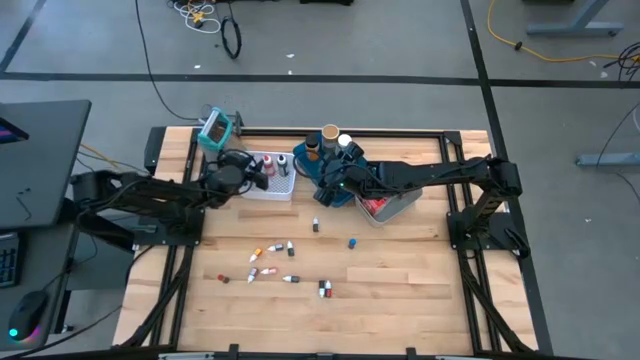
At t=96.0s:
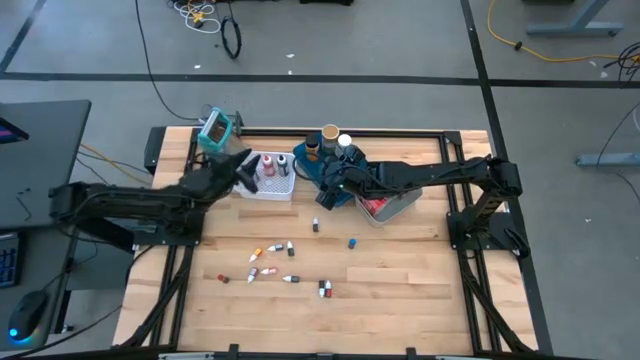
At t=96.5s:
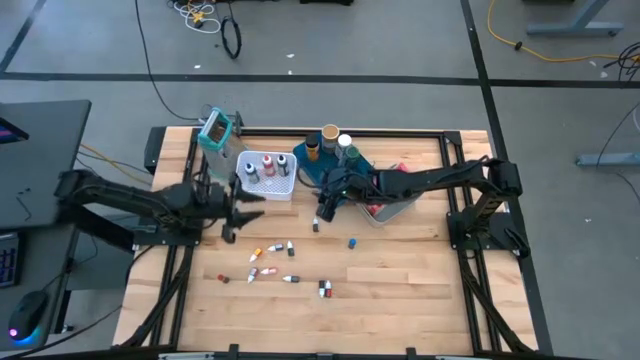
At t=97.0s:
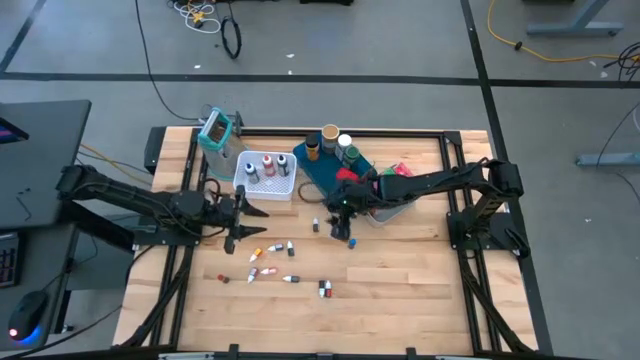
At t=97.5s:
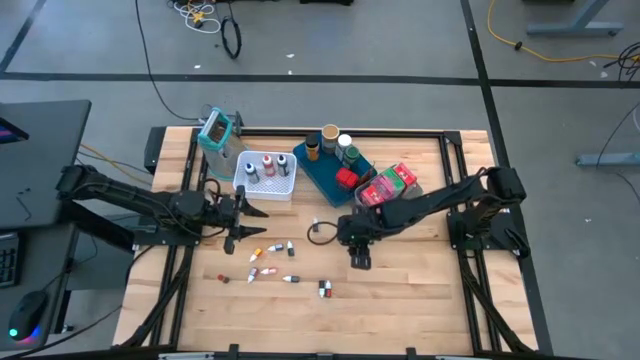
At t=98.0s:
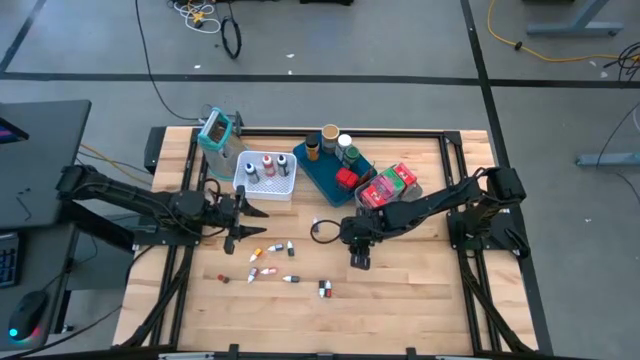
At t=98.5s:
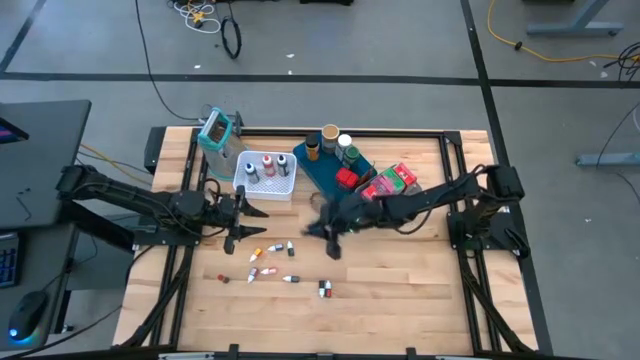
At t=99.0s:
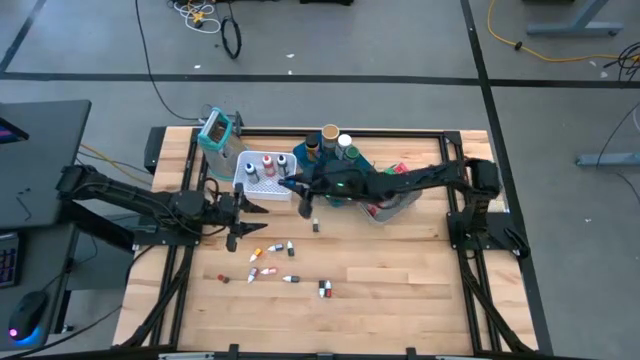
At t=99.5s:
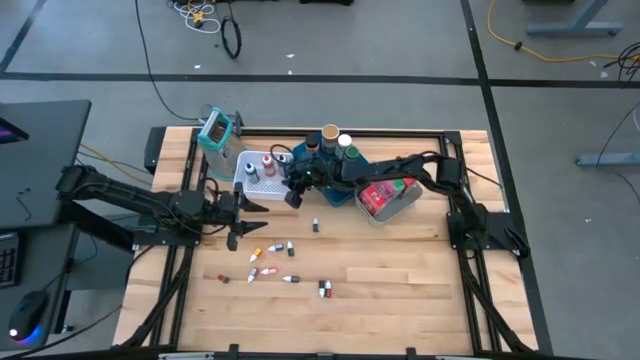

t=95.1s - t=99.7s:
Task: Pick & Place Kitchen Items
Put the blue lid food coloring bottle into the white bin

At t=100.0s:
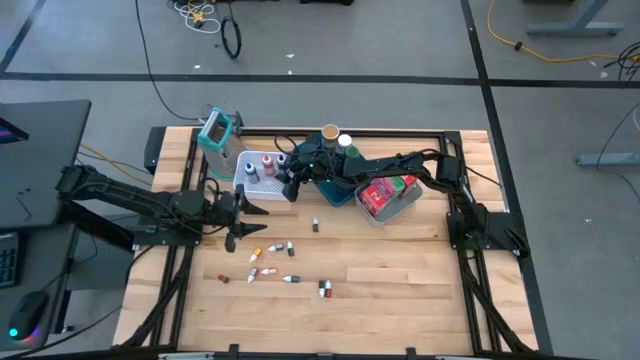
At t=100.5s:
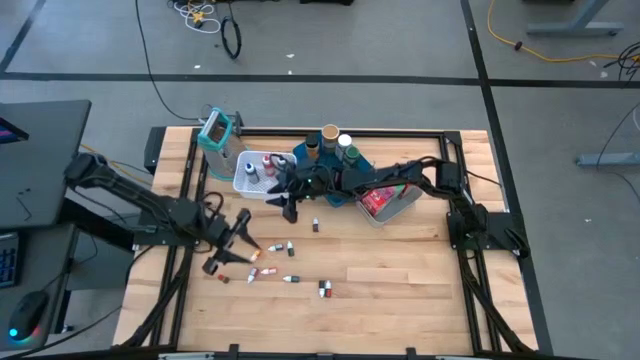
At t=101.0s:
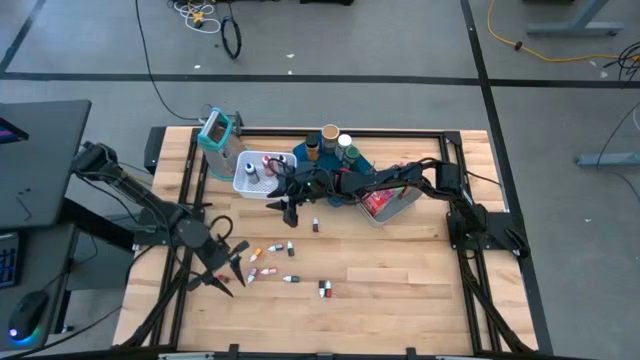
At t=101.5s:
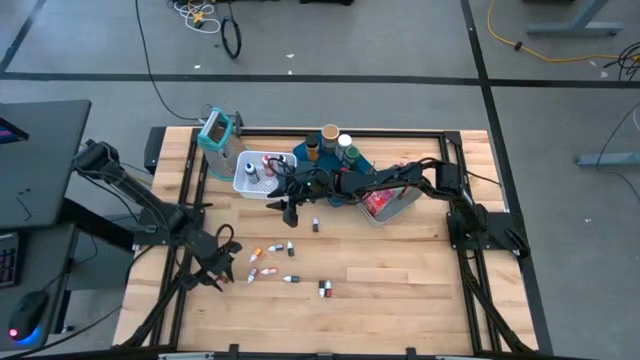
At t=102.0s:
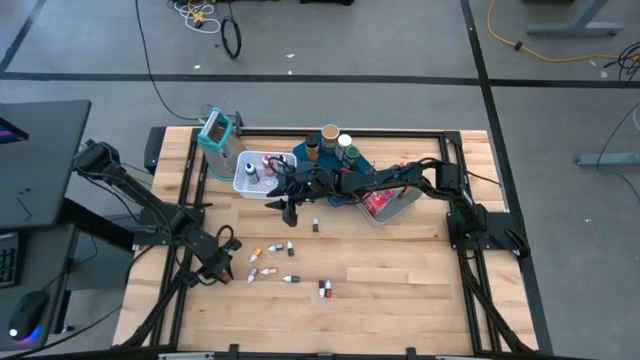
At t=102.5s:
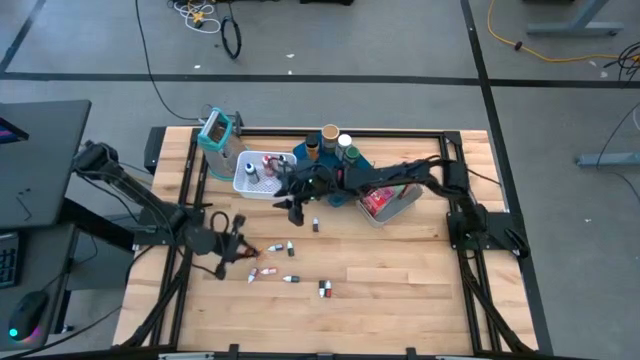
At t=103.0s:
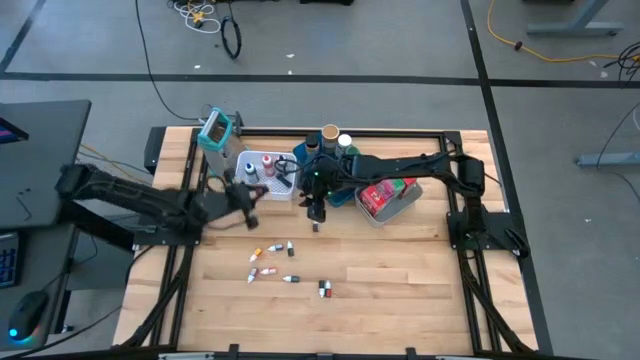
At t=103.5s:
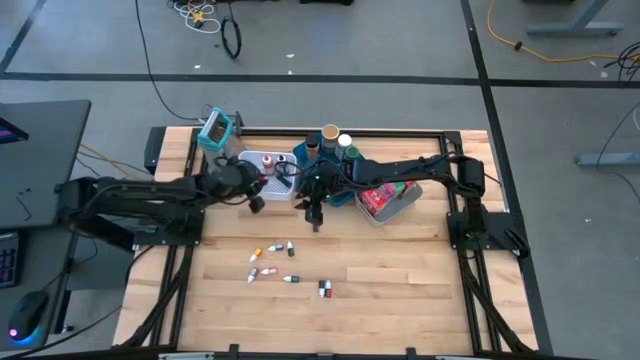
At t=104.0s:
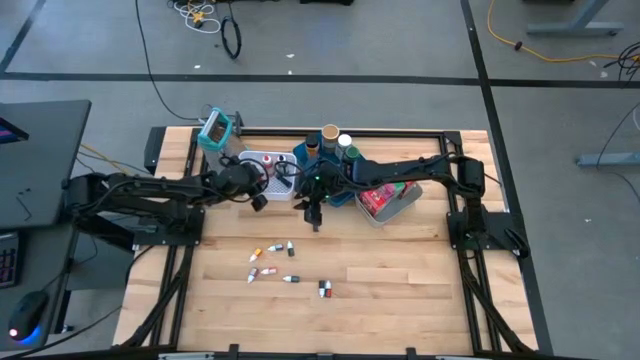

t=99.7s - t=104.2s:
Put the red lid food coloring bottle into the white bin

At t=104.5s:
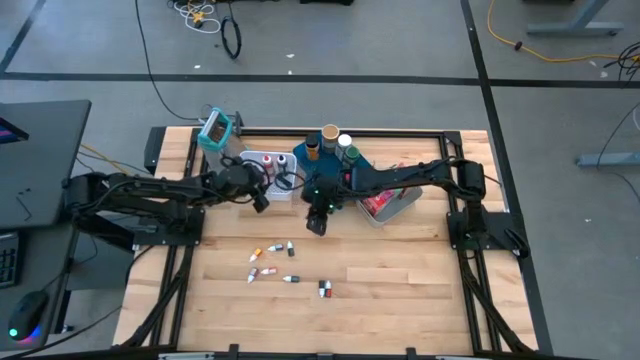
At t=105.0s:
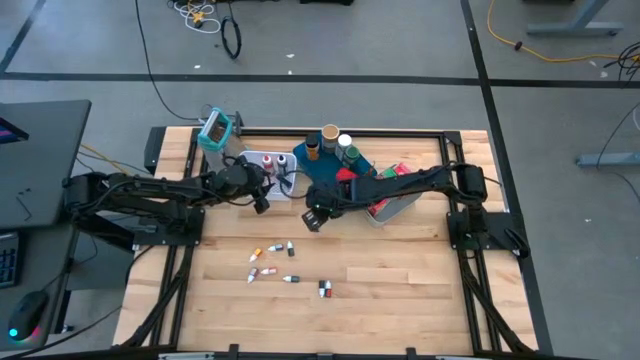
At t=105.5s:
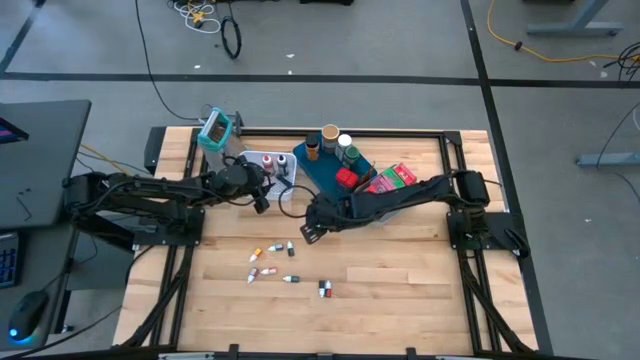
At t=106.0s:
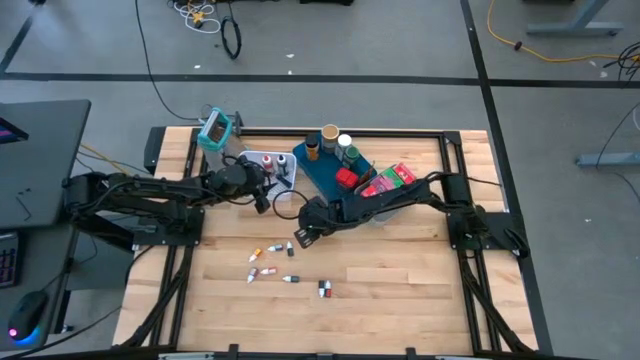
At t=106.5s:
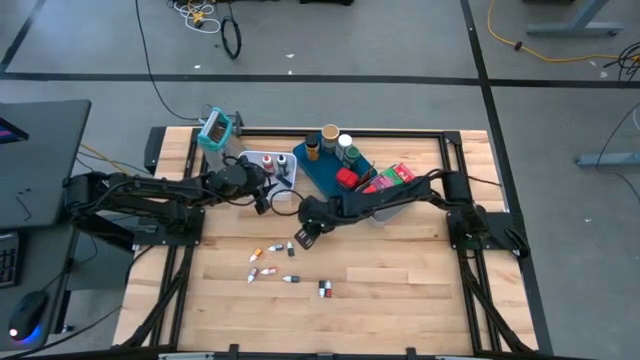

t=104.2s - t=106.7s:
Put the brown food coloring bottle into the white bin

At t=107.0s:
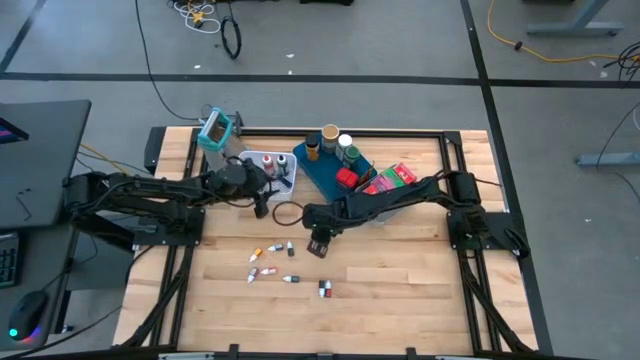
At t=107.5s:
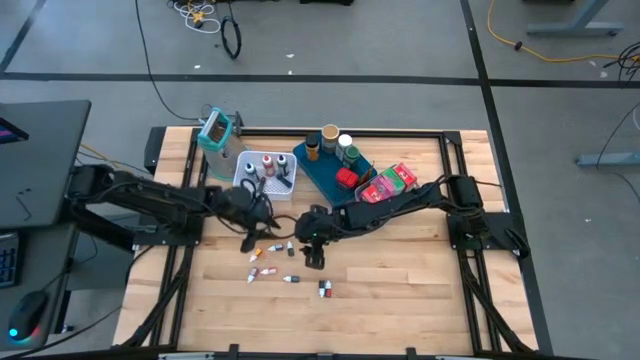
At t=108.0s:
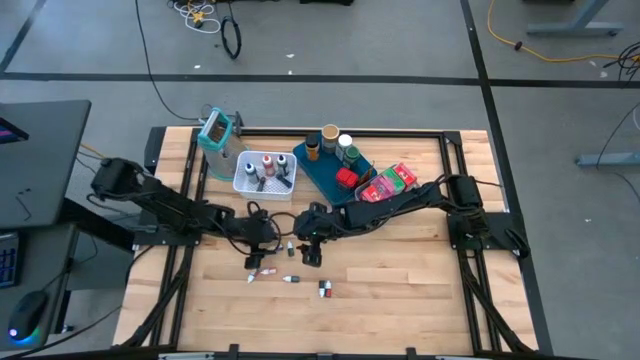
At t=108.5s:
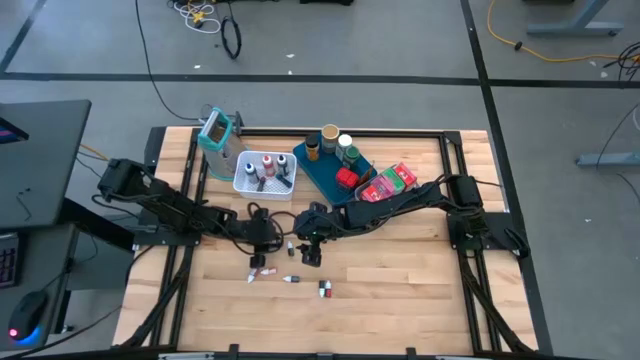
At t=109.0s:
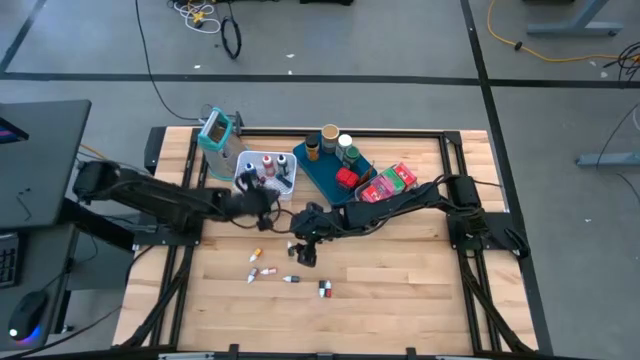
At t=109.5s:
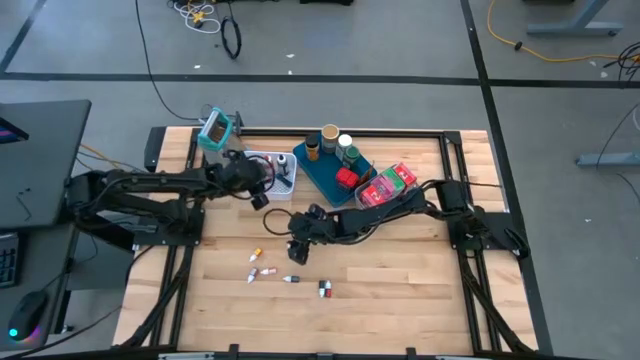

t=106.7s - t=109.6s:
Put the purple food coloring bottle into the white bin

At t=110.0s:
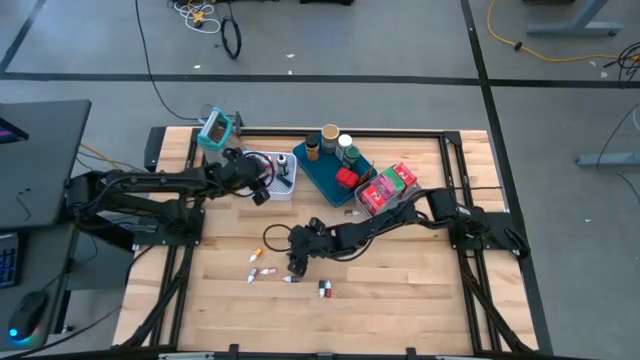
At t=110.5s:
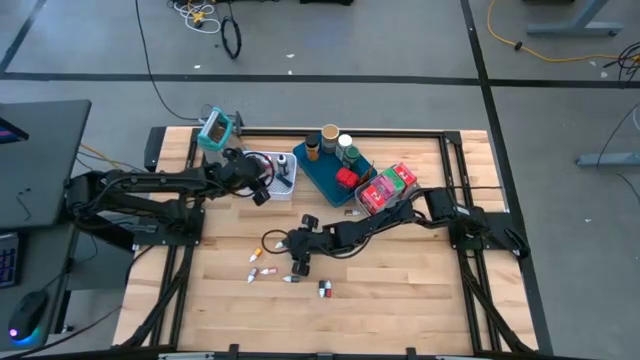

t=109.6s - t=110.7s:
Put the dark green food coloring bottle into the white bin

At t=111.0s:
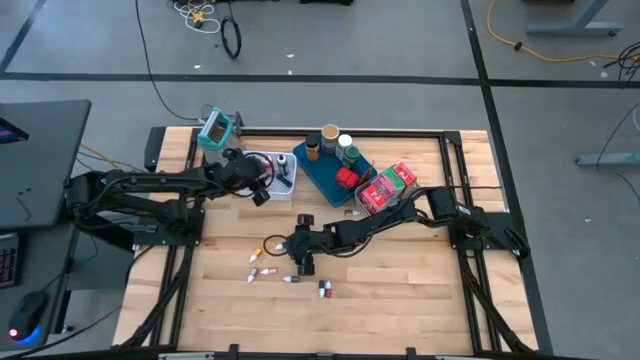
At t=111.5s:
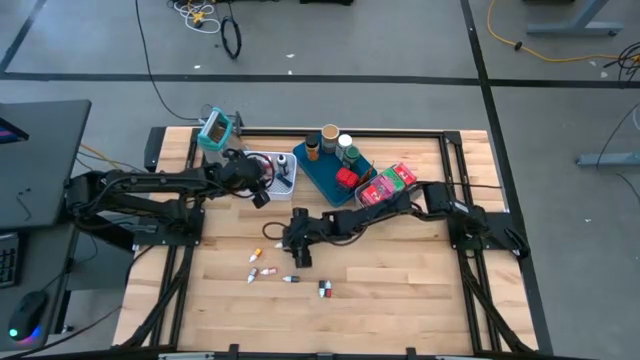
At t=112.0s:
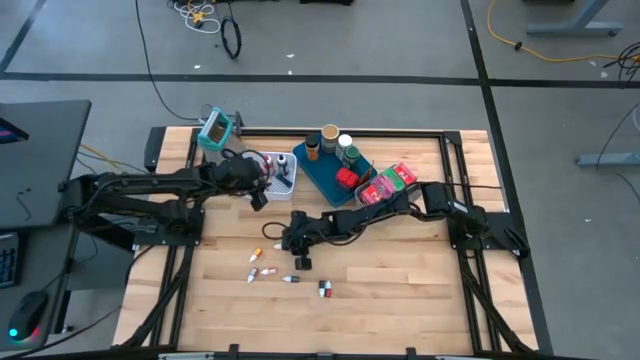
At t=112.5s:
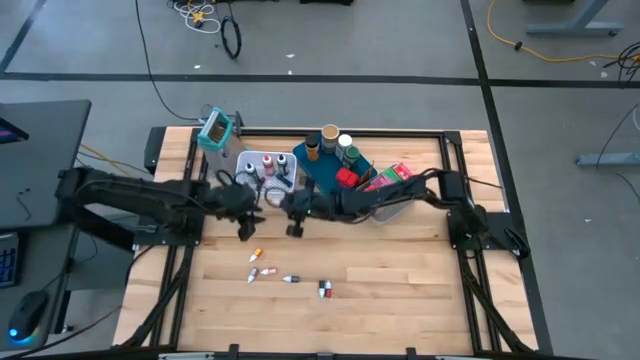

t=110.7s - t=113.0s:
Put the dark green food coloring bottle into the white bin

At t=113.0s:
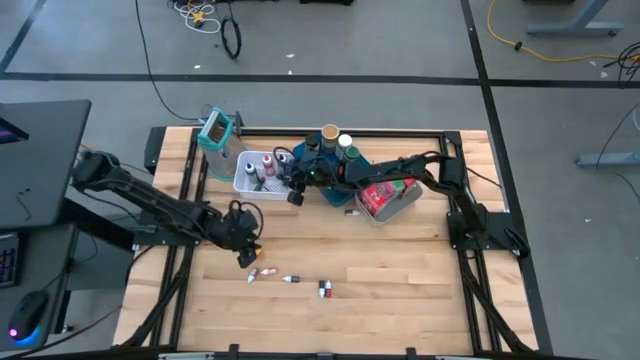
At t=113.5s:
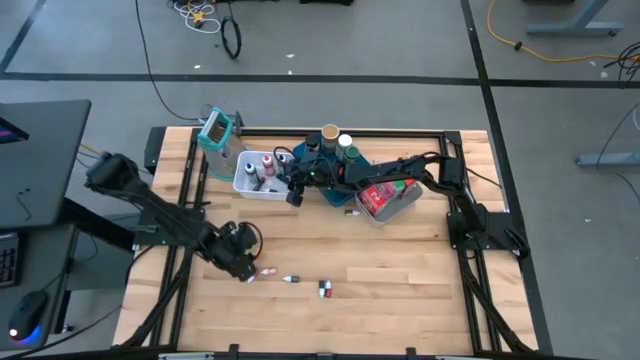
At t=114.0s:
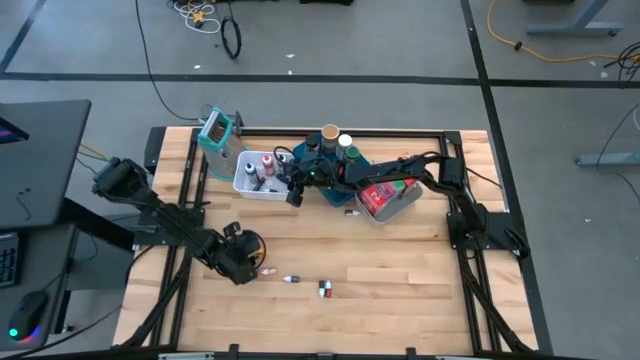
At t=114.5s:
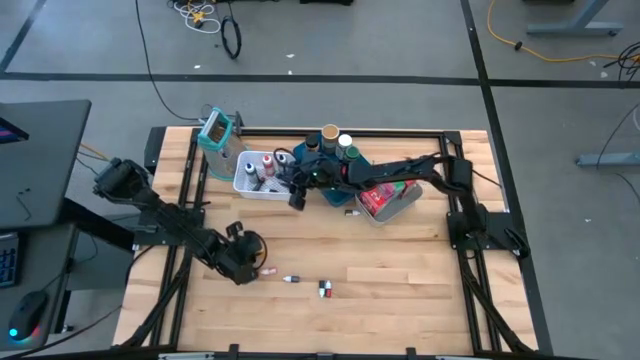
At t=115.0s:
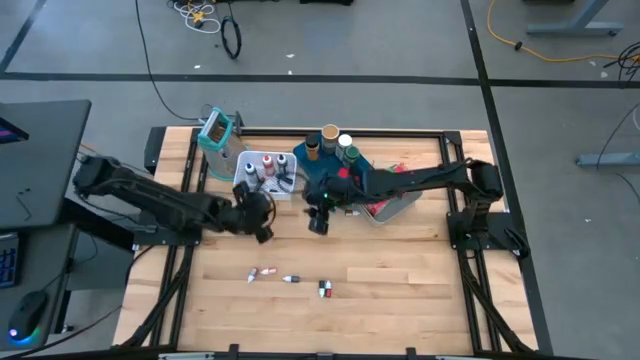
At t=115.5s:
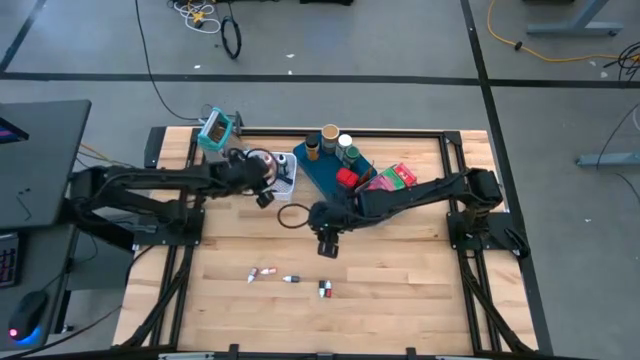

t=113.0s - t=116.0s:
Put the yellow food coloring bottle into the white bin

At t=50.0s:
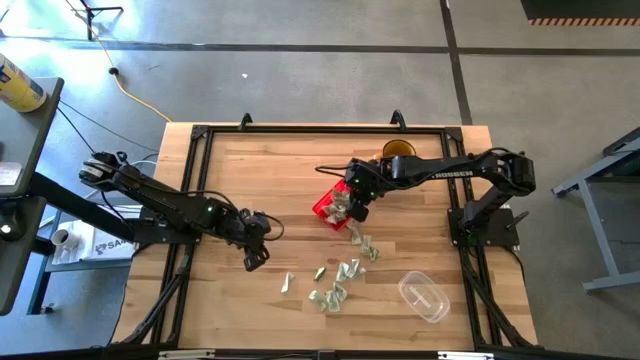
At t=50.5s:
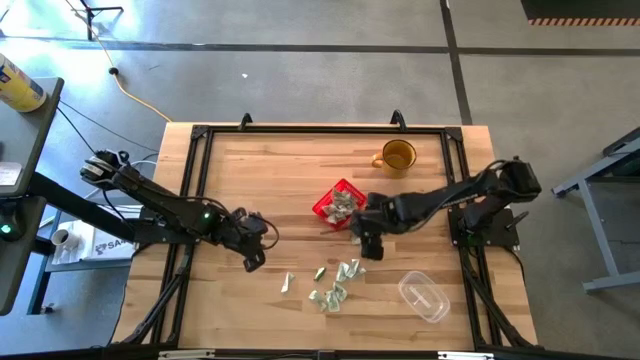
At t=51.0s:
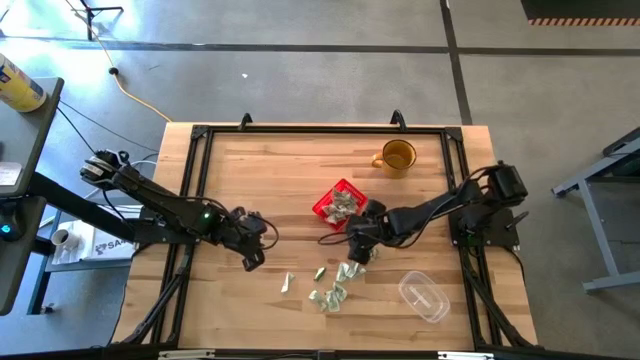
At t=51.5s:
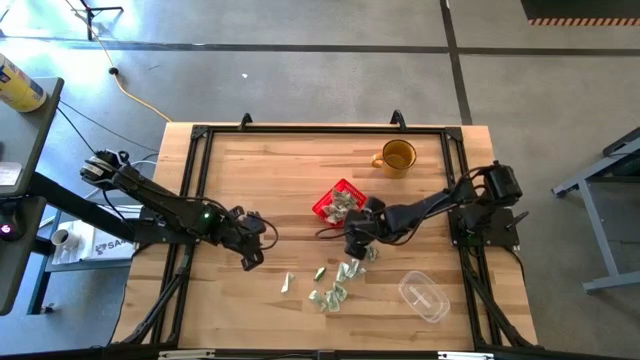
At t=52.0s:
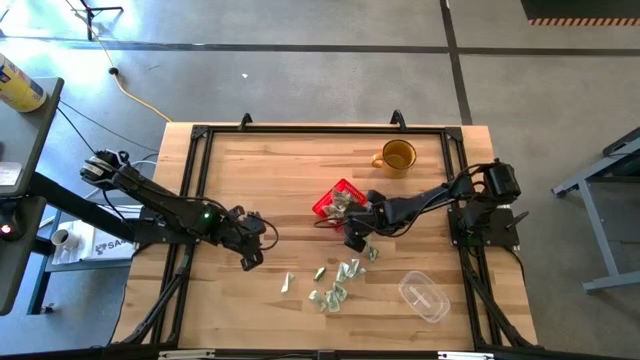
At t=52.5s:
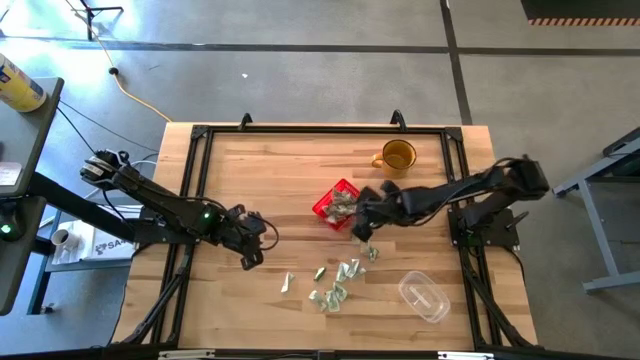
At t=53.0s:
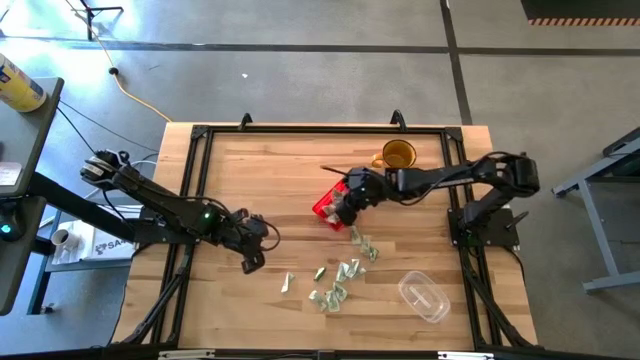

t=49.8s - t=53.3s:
Task: Pick and place items into bin
Put the white stevia packet into the red bin
